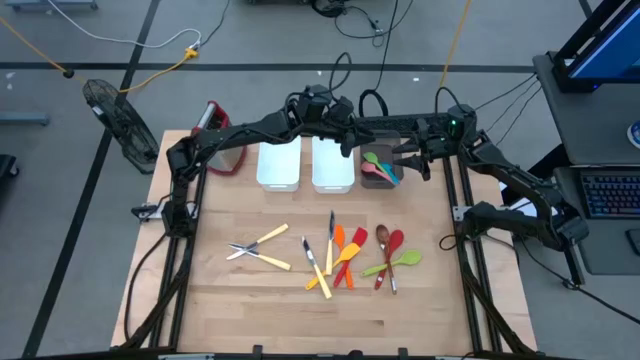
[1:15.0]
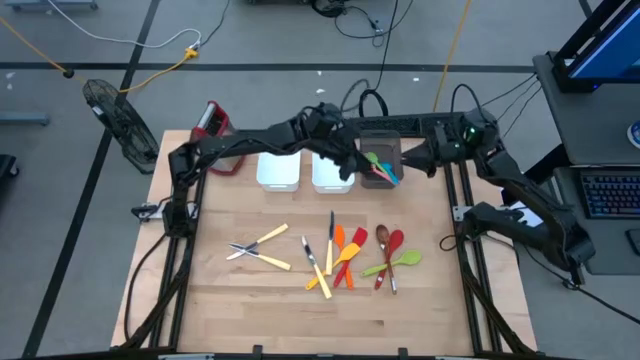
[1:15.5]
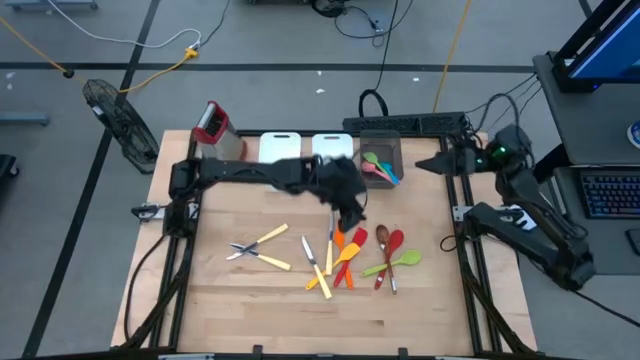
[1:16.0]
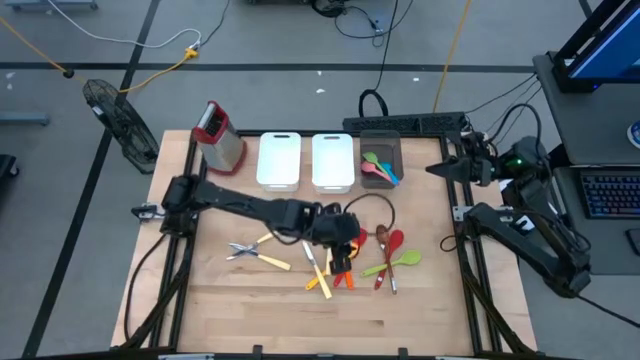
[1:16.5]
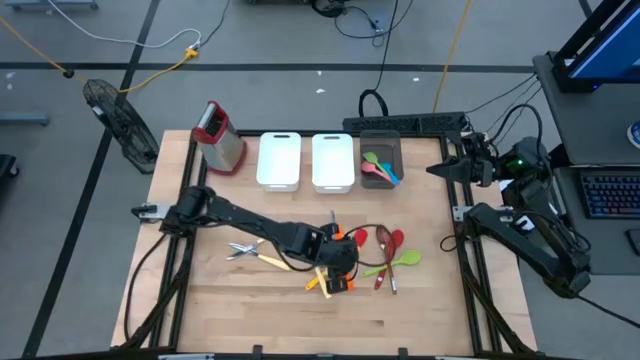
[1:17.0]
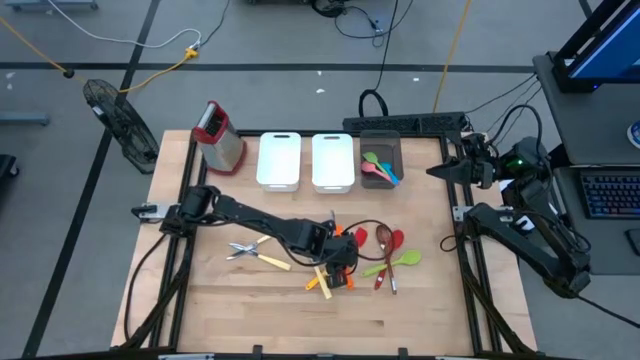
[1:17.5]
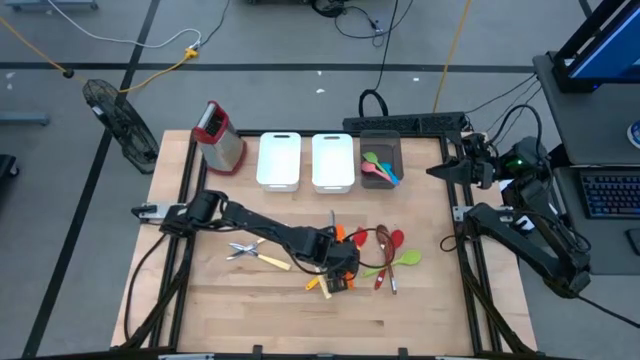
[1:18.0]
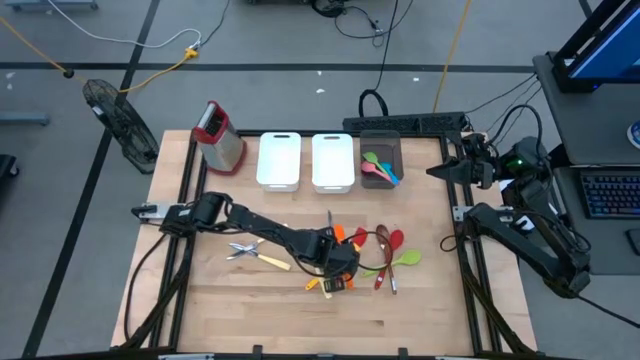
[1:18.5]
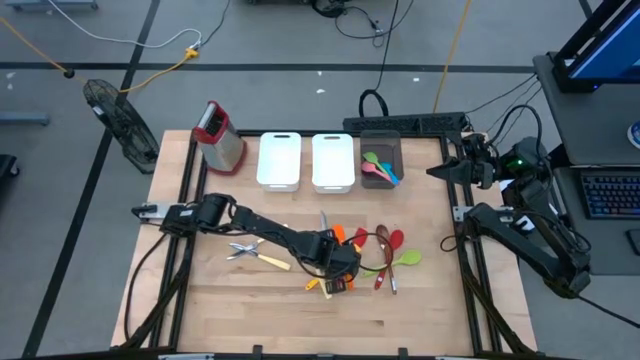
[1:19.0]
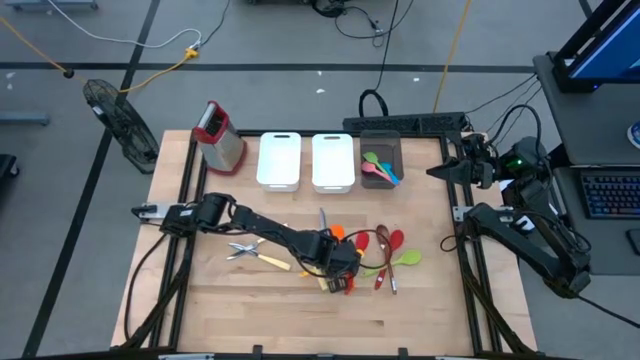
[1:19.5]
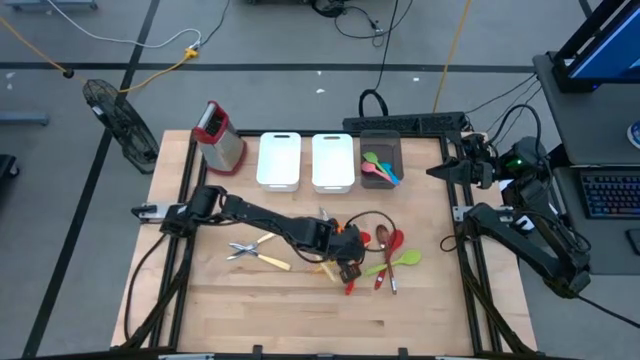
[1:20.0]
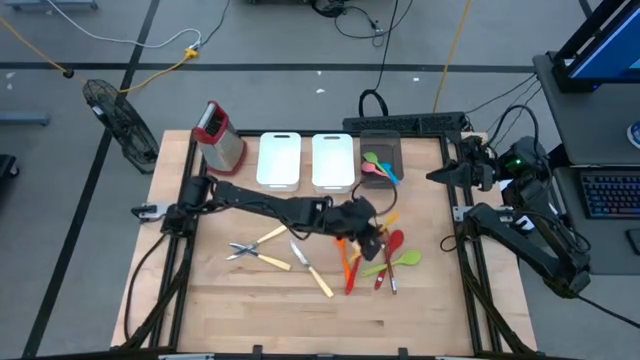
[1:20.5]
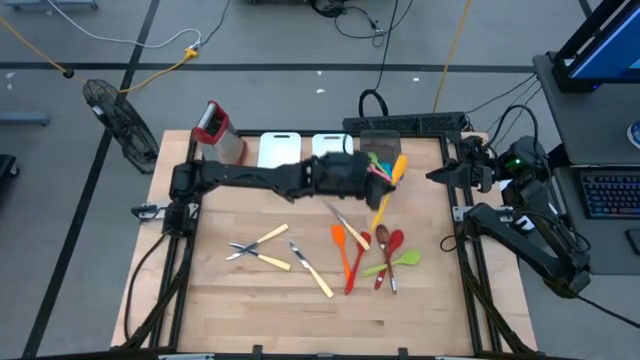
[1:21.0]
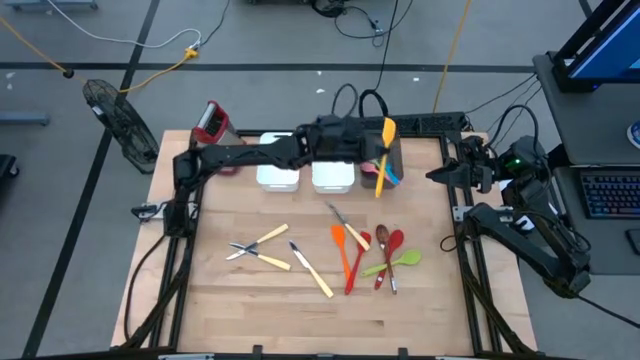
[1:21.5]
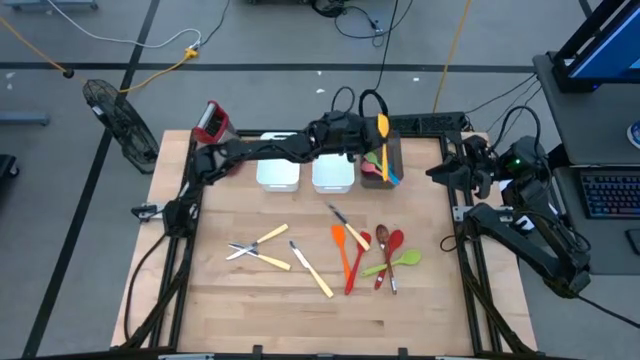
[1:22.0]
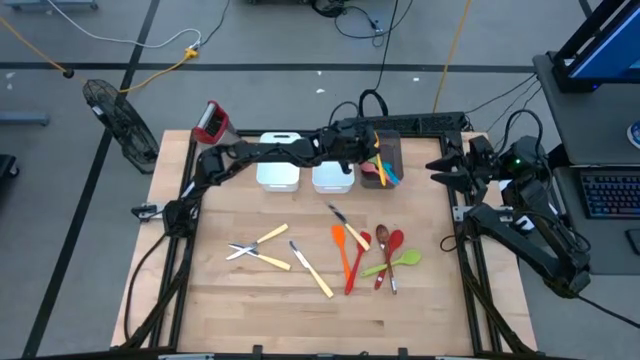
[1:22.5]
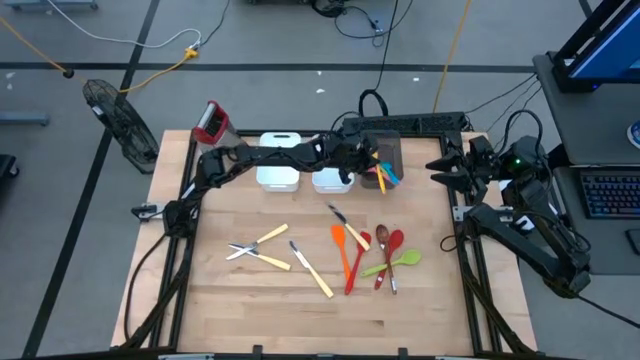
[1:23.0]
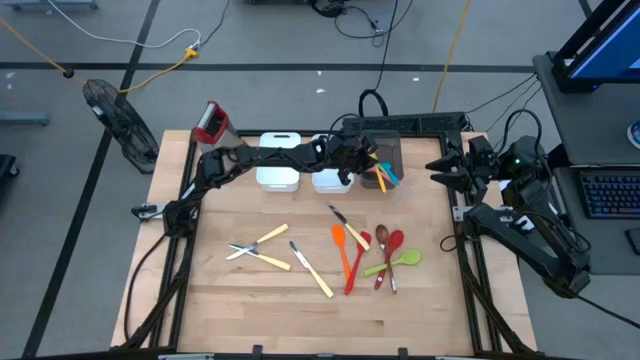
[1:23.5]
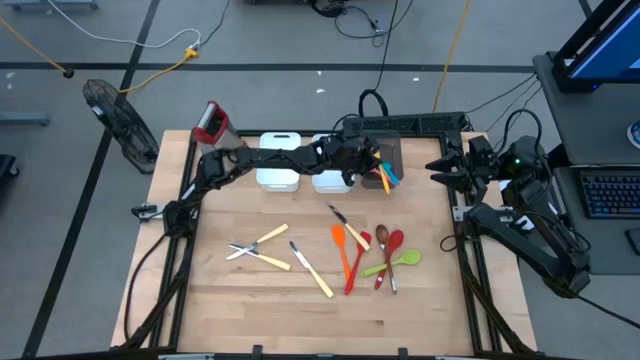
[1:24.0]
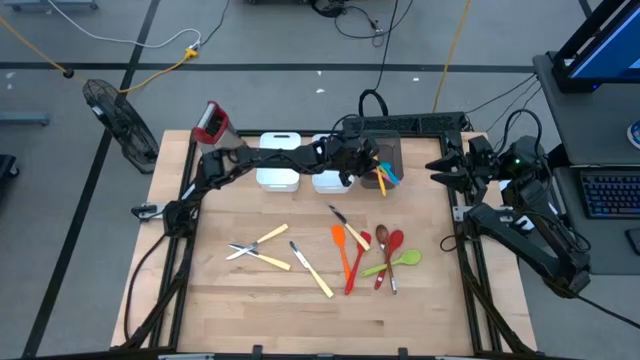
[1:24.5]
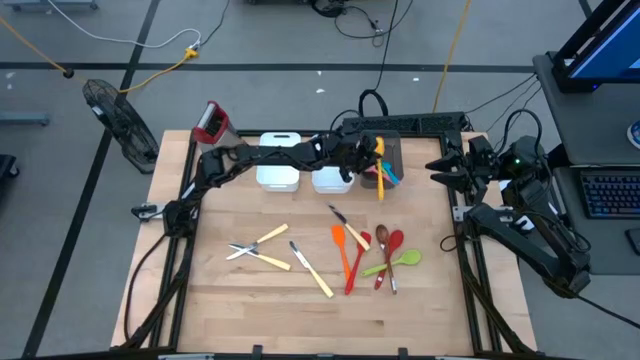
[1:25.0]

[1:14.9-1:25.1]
Task: Pick & Place Kitchen Items
Put the yellow spatula into the black bin

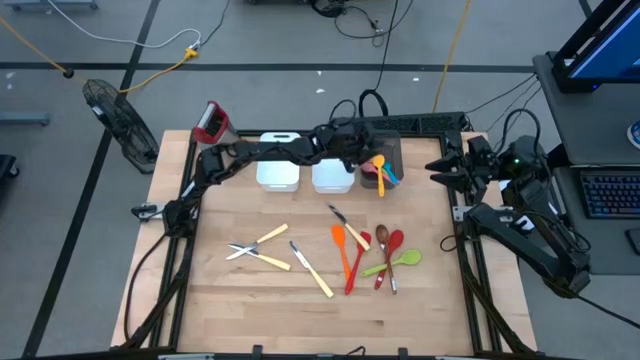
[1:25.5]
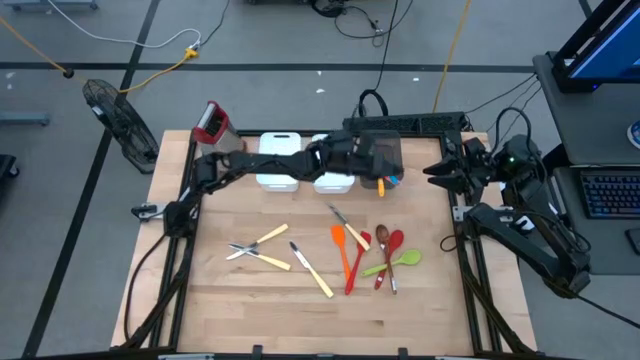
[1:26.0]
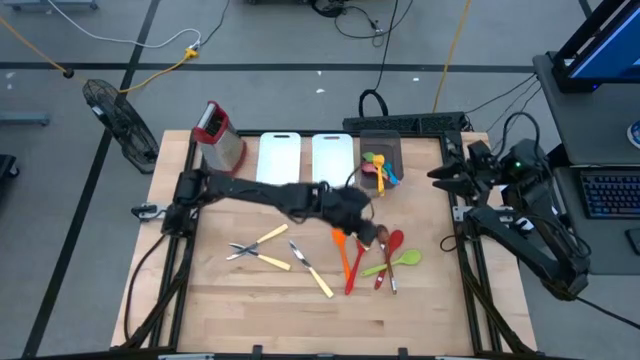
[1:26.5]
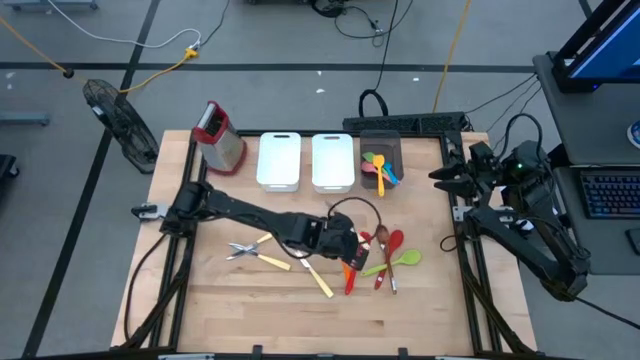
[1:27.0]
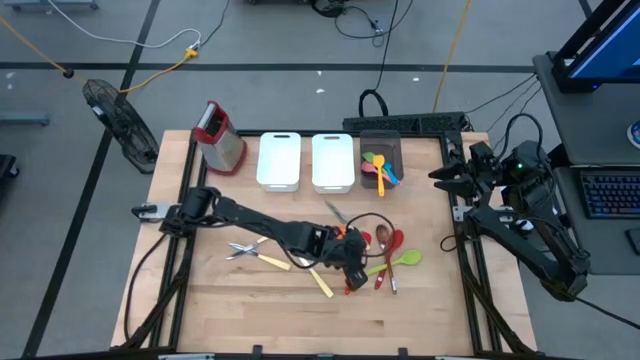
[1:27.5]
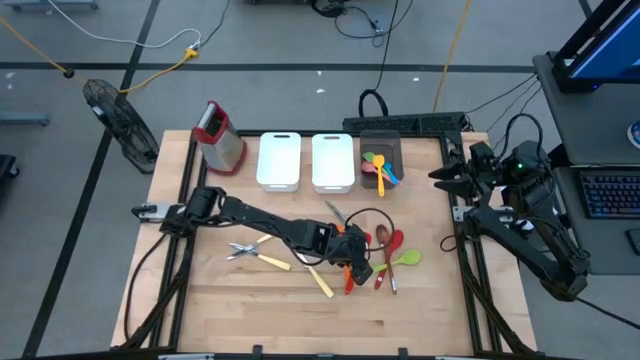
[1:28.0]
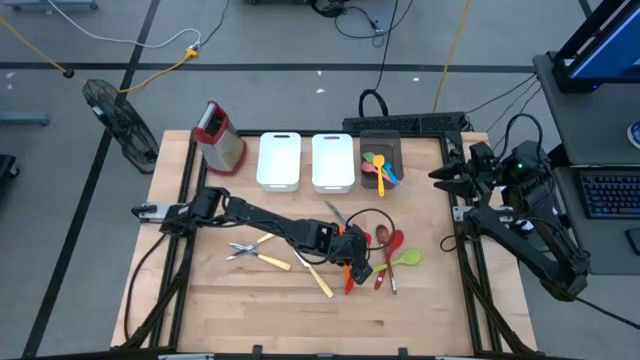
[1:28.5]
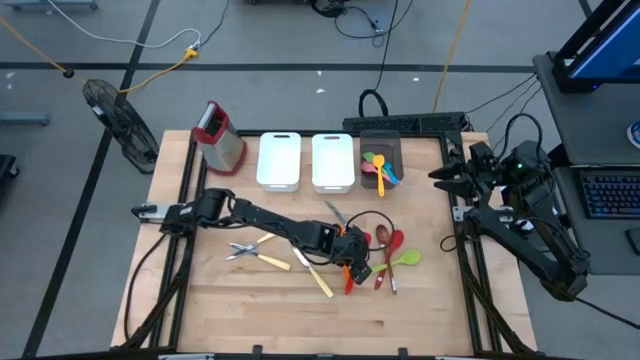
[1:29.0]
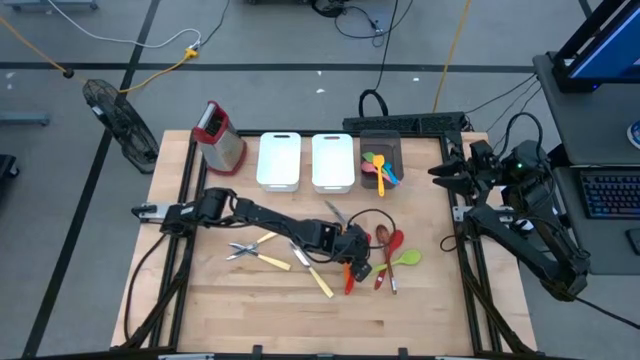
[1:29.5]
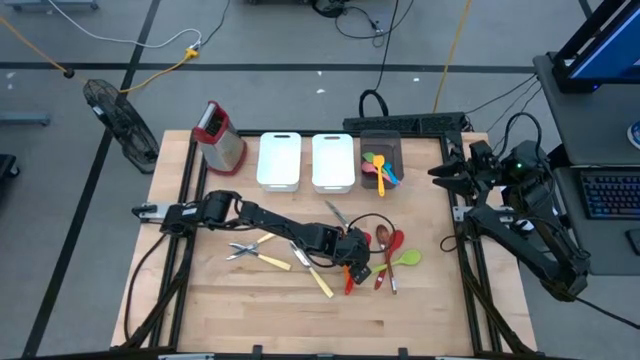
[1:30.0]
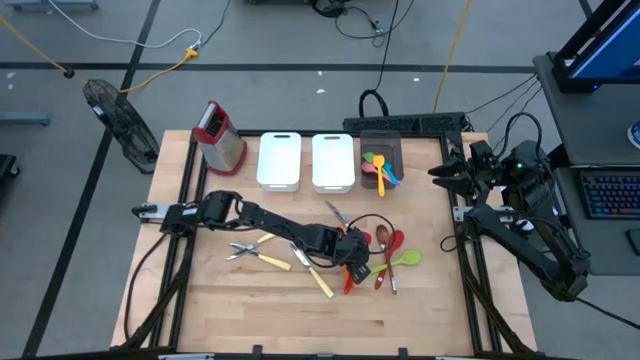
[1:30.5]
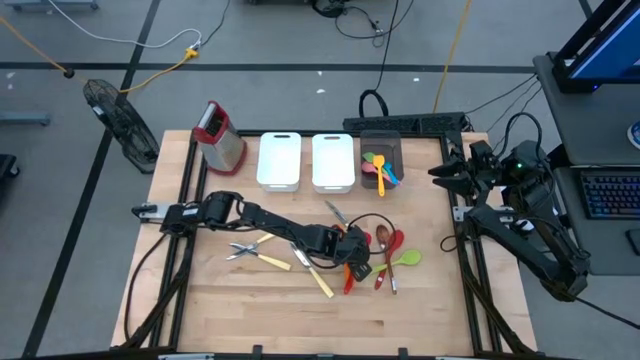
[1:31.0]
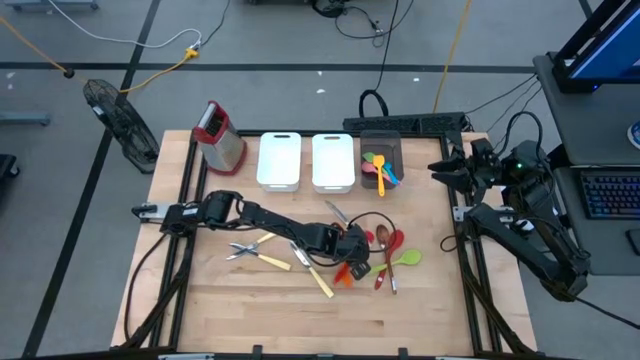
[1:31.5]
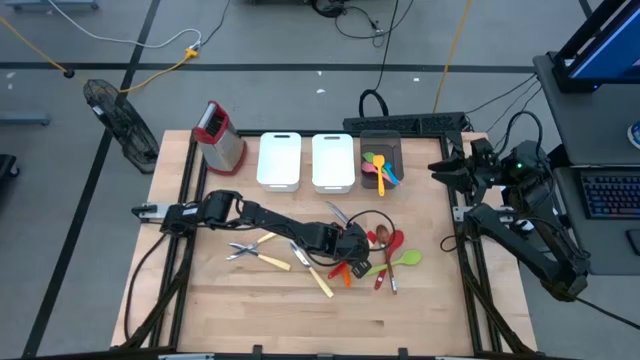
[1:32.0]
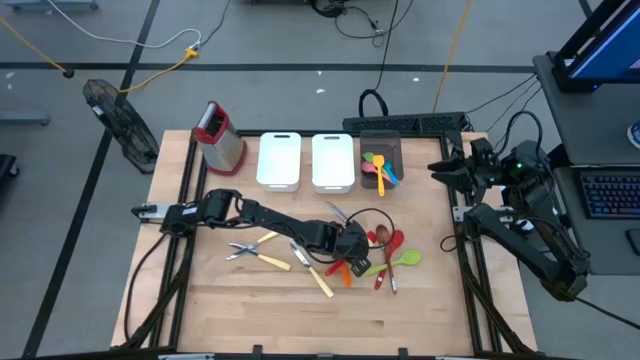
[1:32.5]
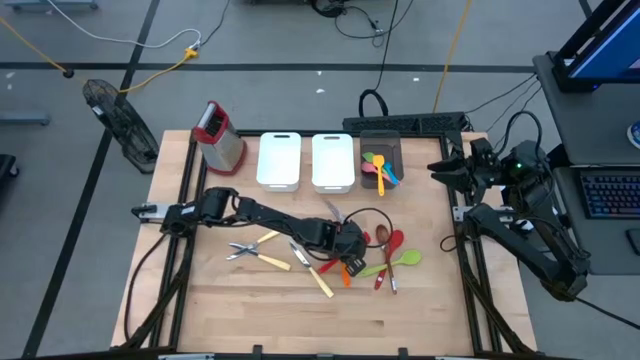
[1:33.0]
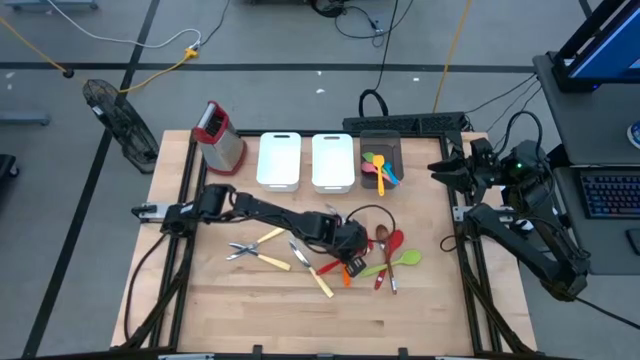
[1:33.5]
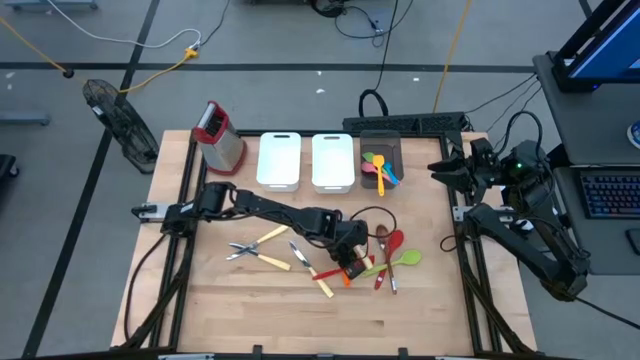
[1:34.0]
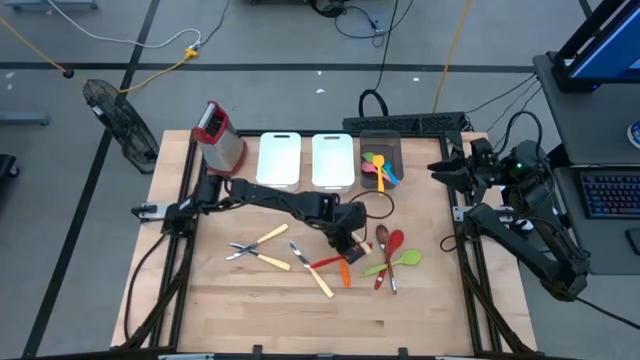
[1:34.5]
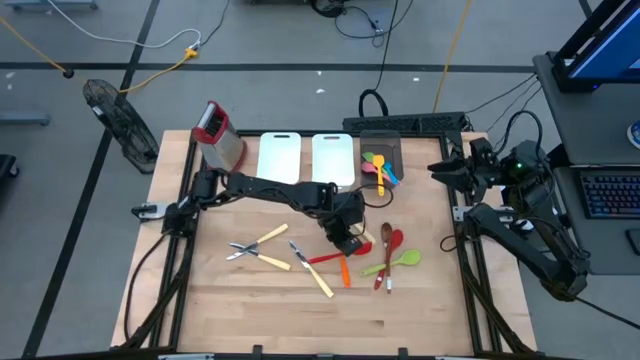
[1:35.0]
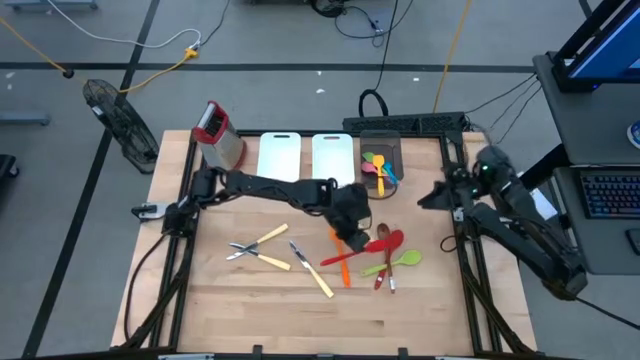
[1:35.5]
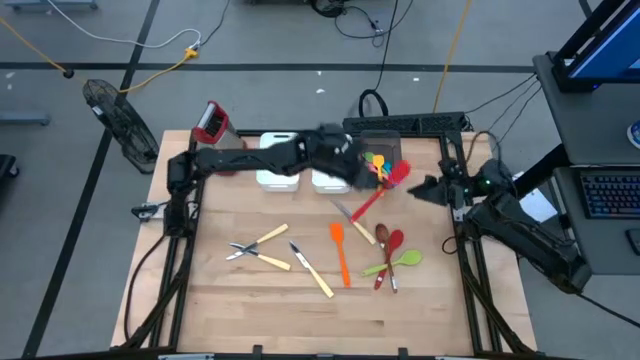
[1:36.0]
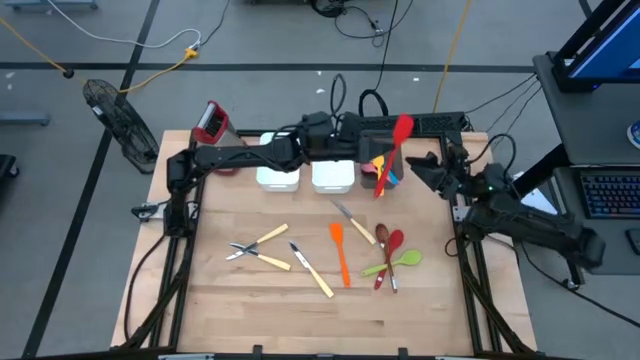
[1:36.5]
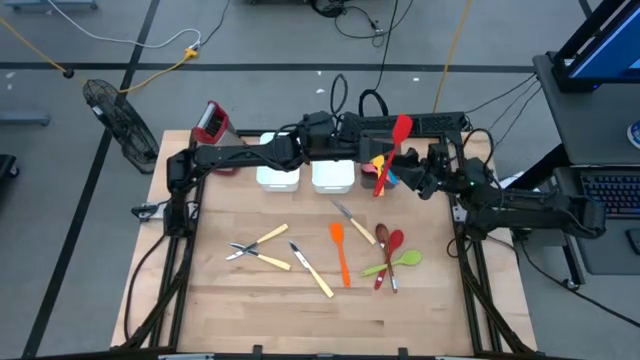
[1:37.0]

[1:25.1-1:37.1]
Put the red spatula into the black bin
